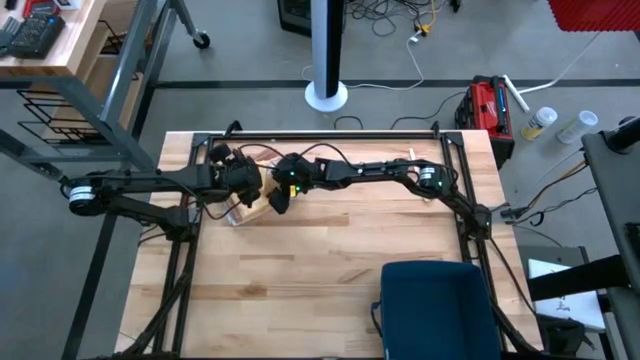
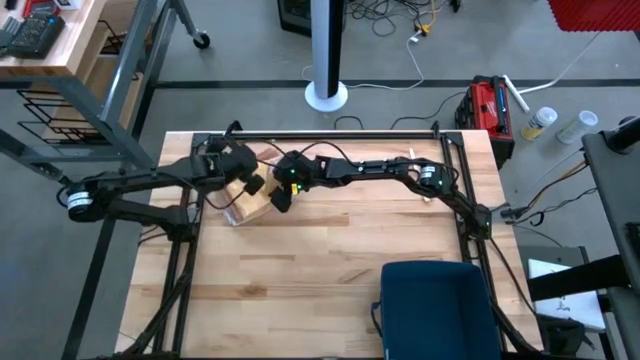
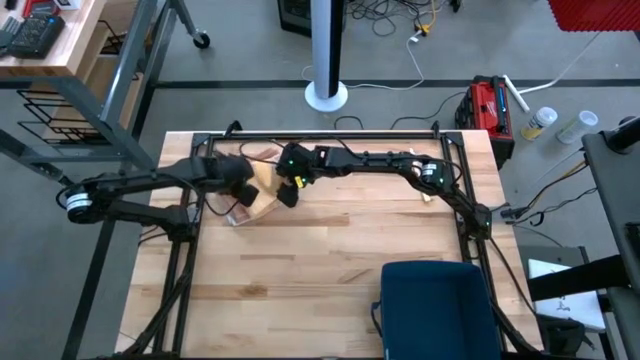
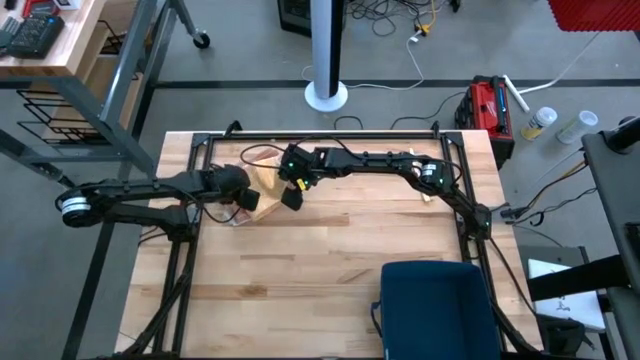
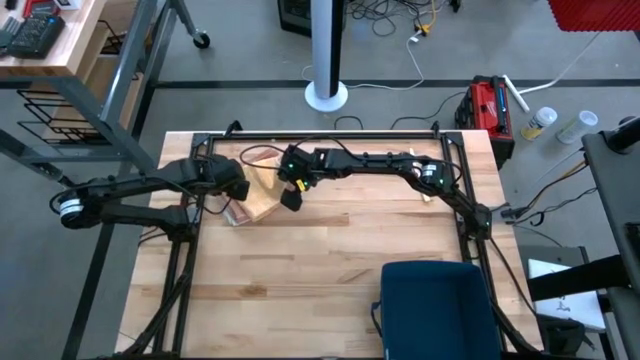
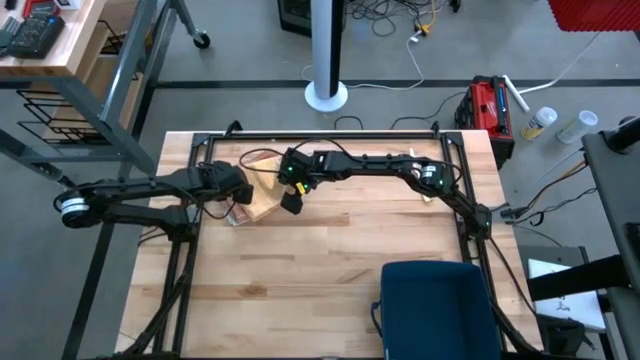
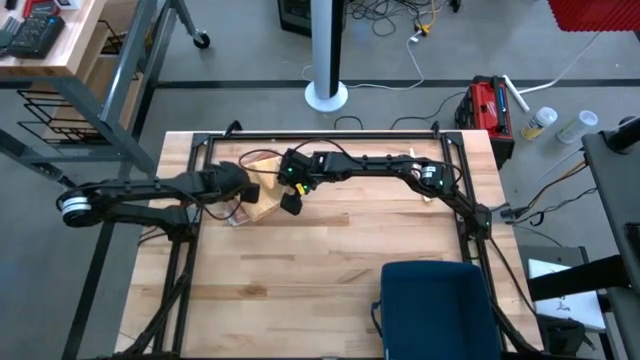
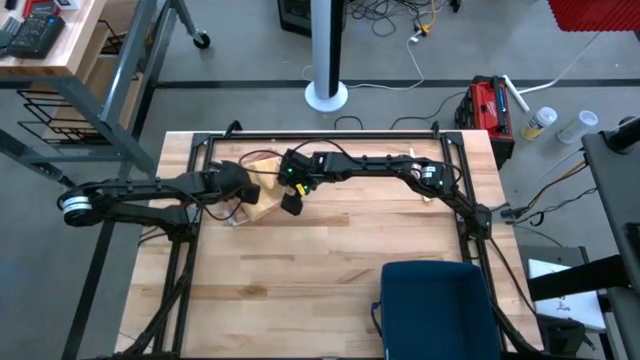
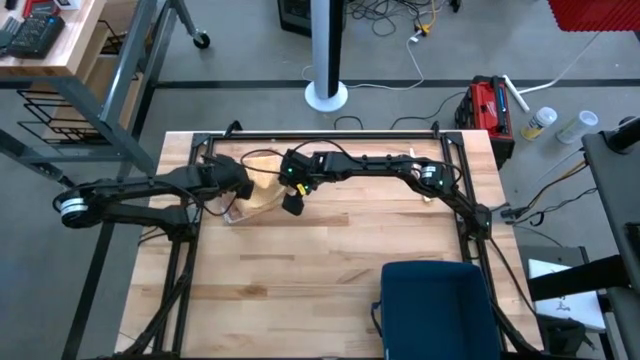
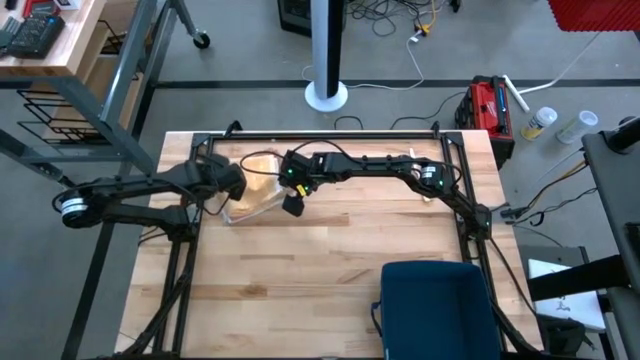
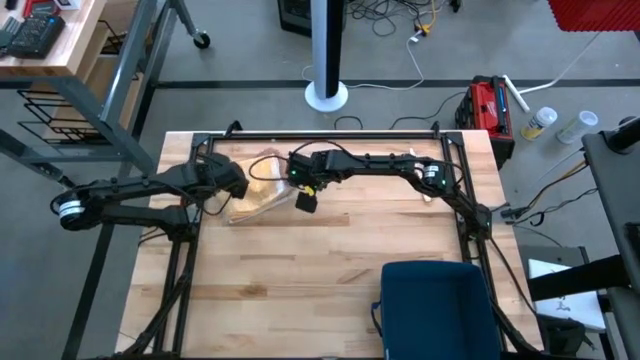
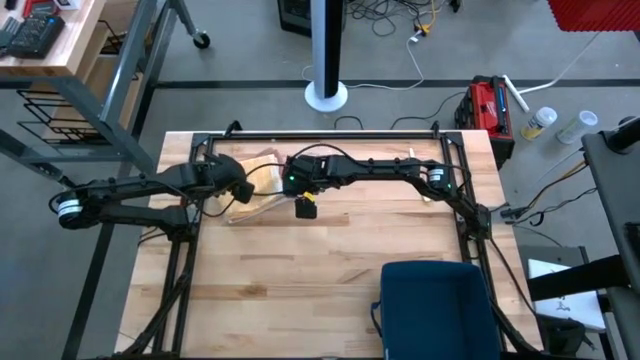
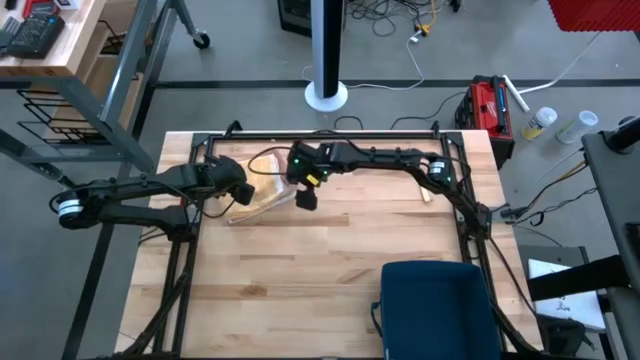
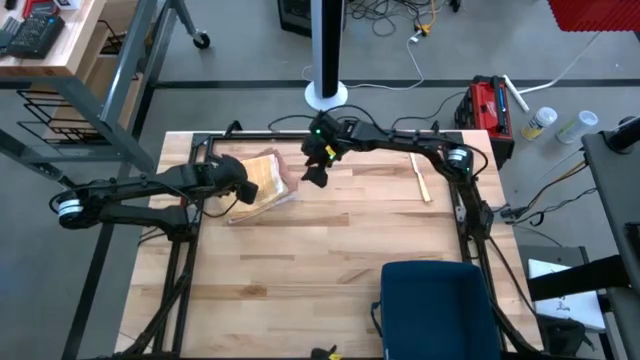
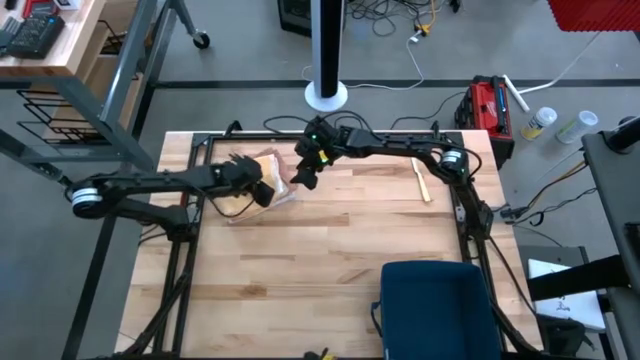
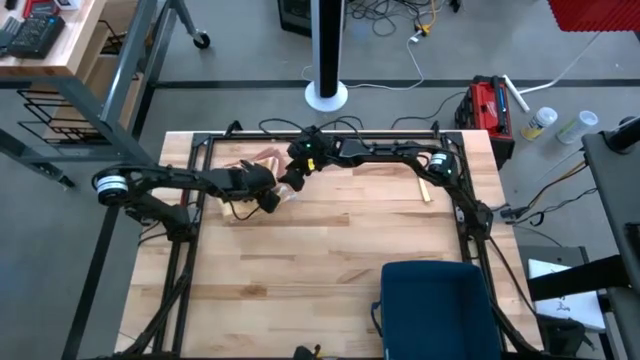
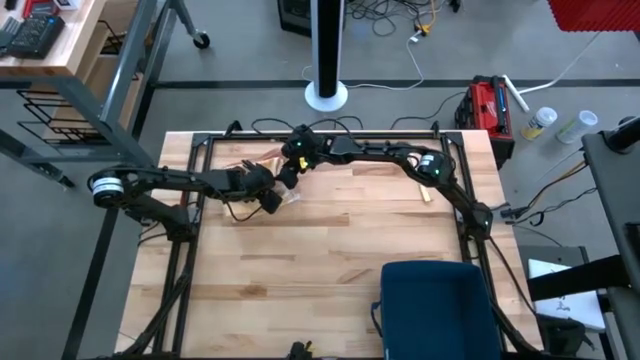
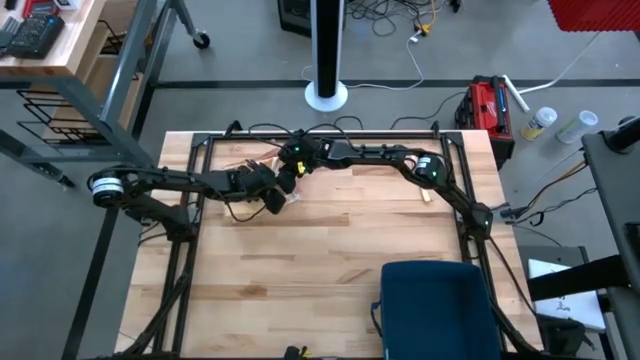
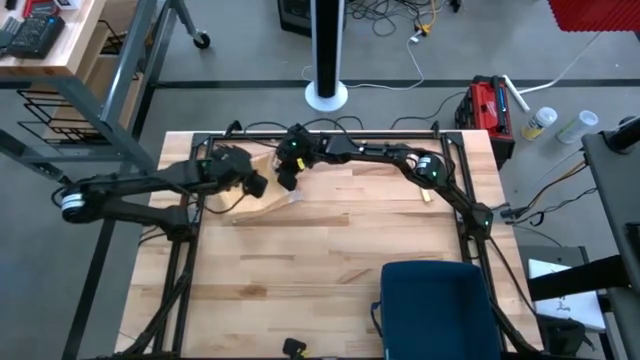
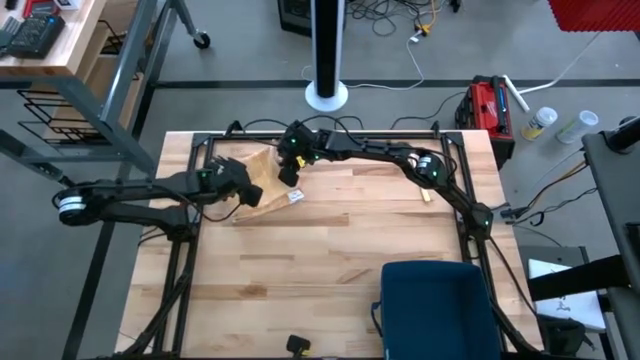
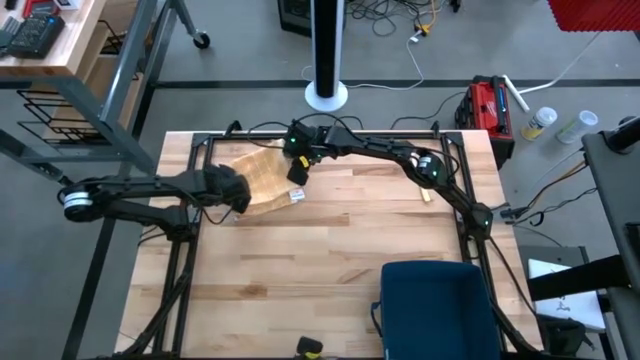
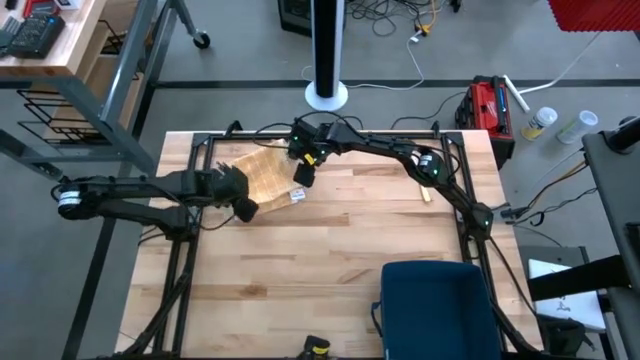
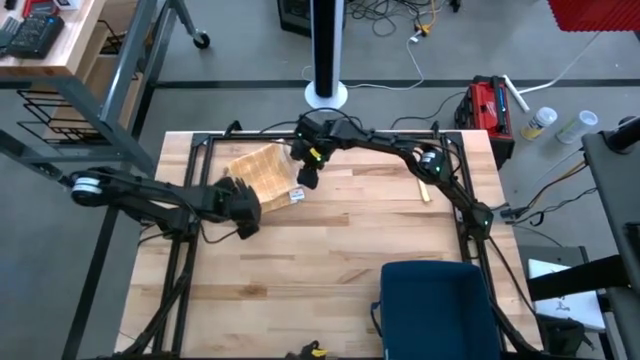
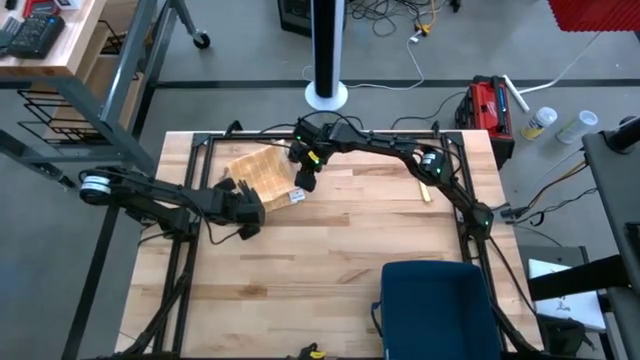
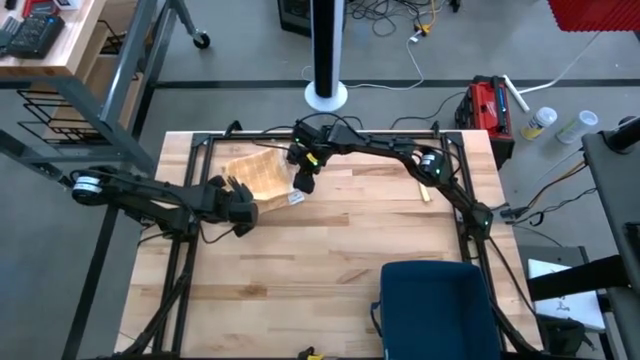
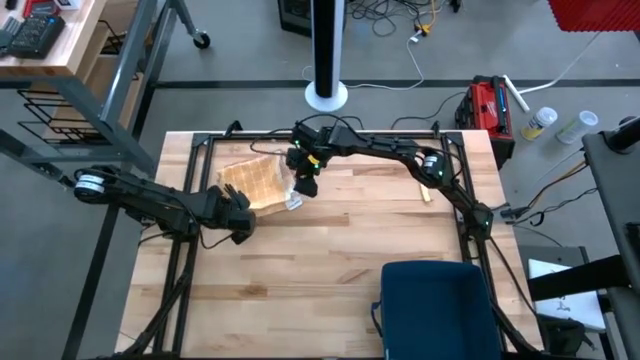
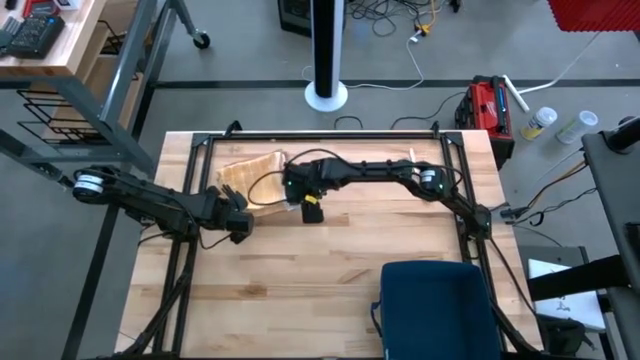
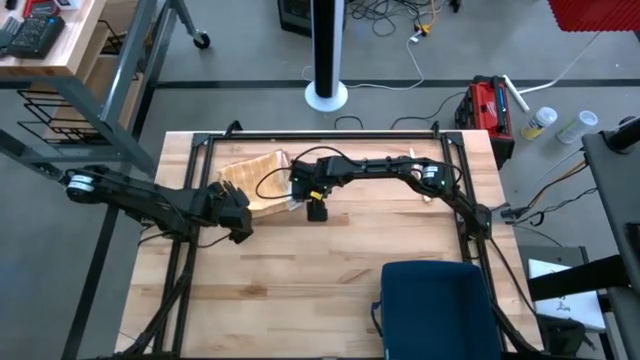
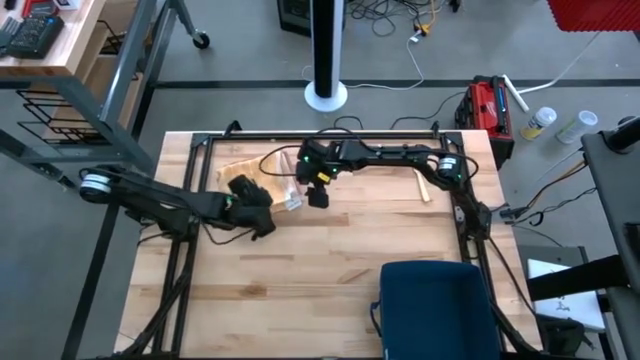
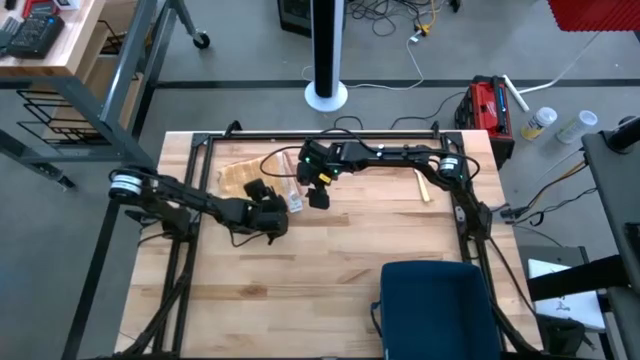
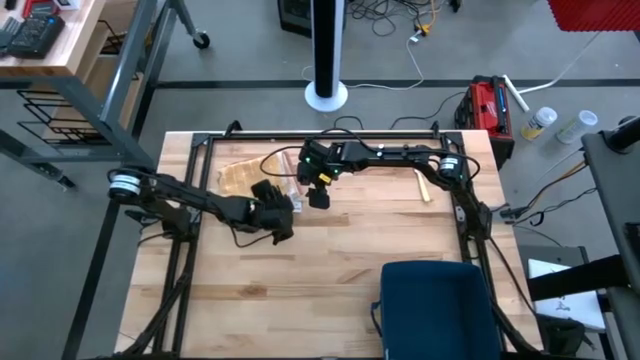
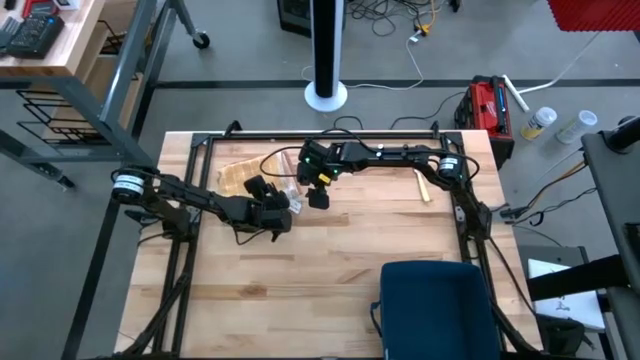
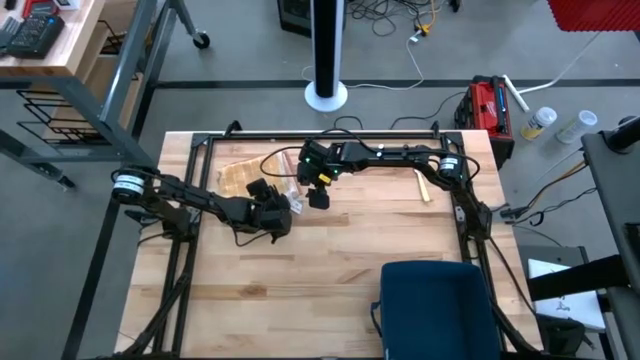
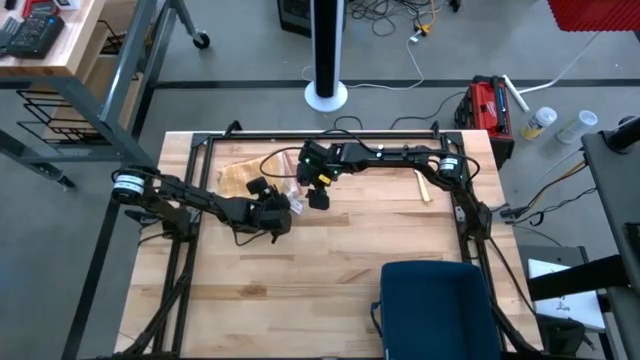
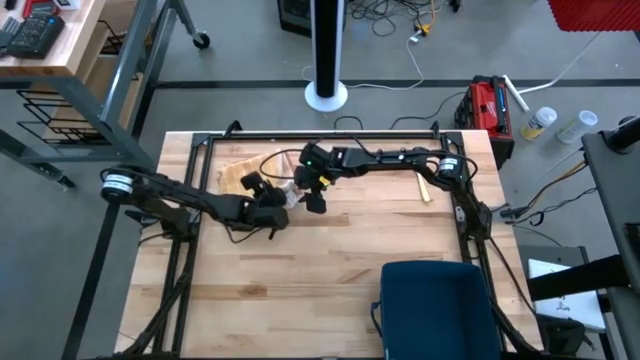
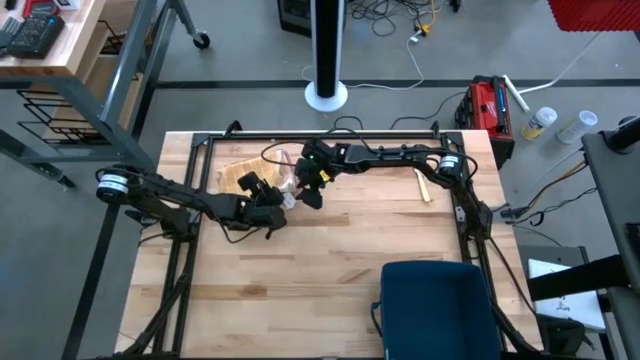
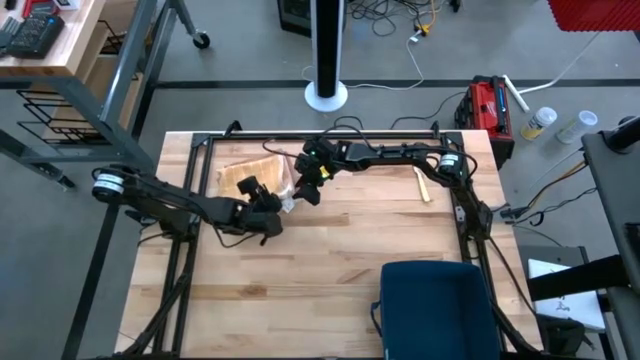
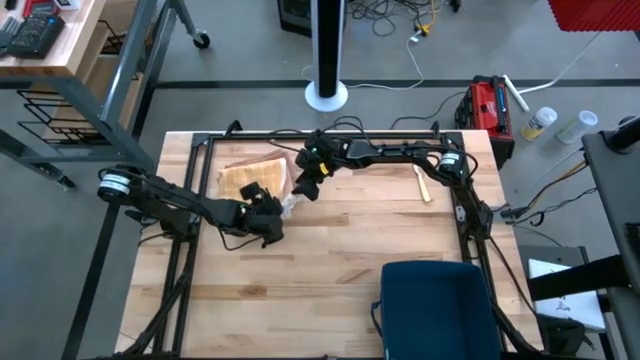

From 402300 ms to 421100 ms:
Task: Fold towel
Stack the yellow towel on top of the brown towel

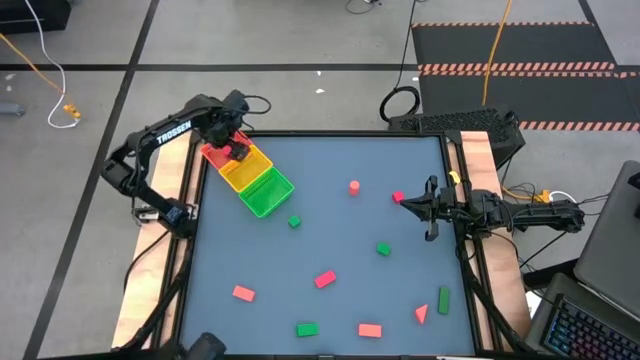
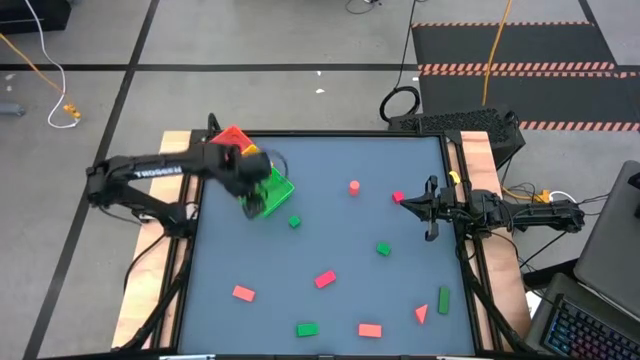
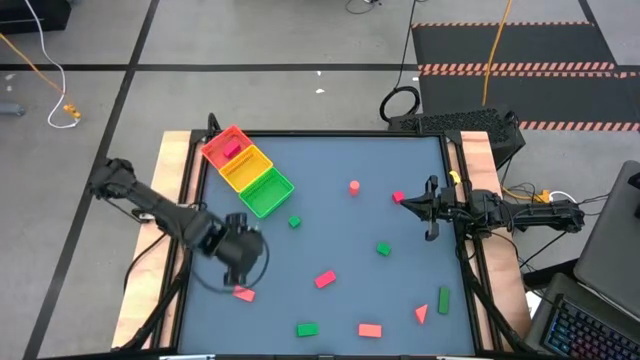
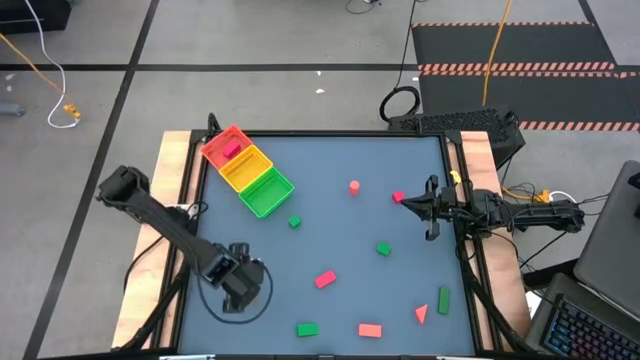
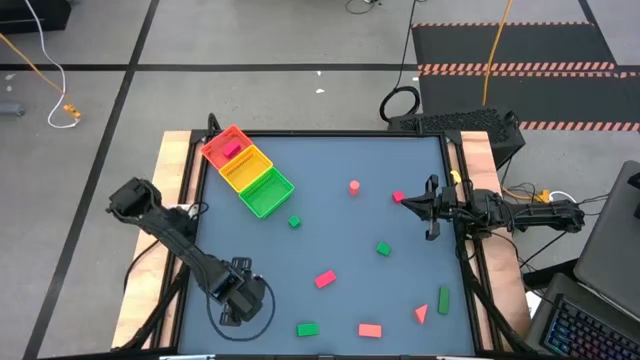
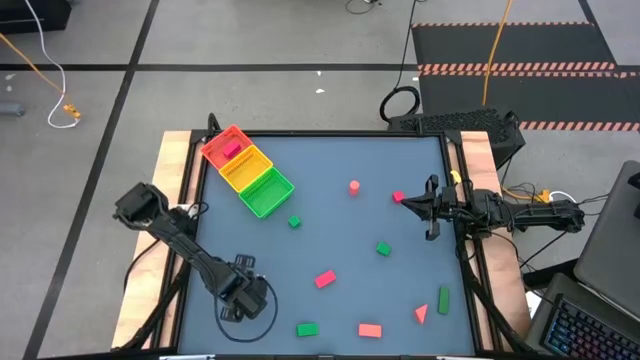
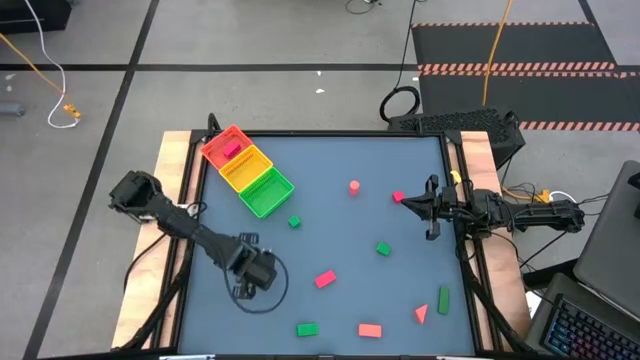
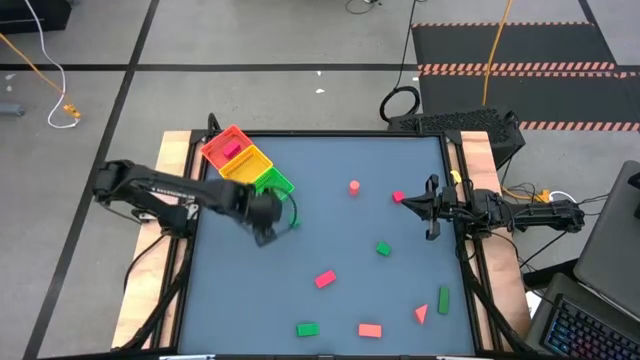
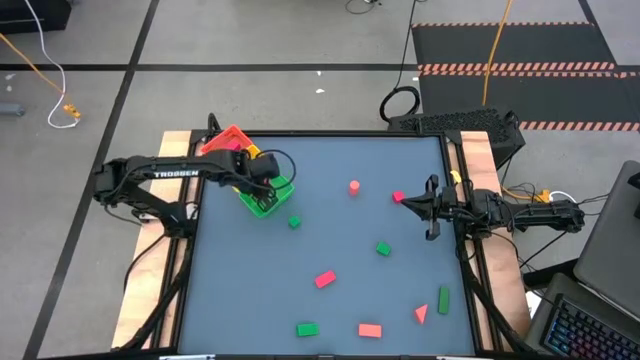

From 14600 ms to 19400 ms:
Task: Sort & place blocks by color
Put the orange block into the green basket
